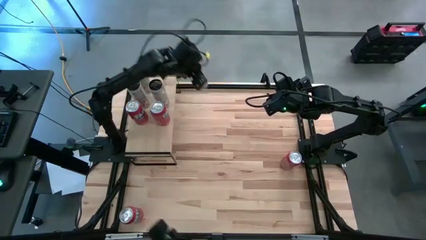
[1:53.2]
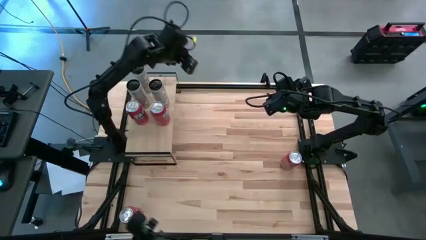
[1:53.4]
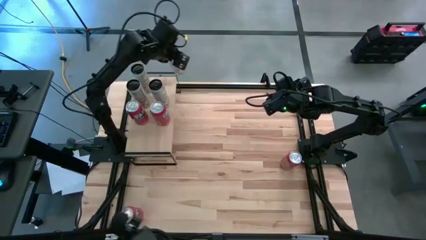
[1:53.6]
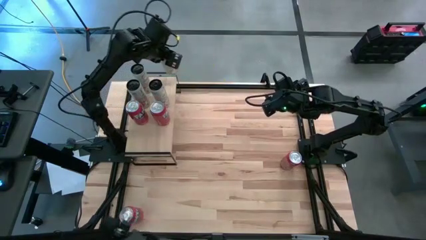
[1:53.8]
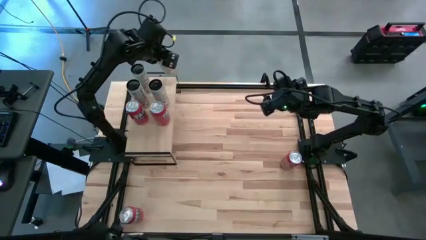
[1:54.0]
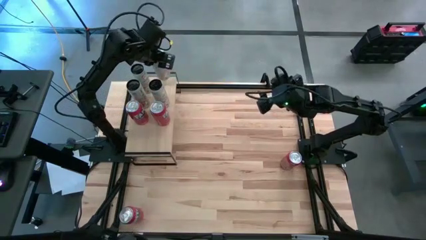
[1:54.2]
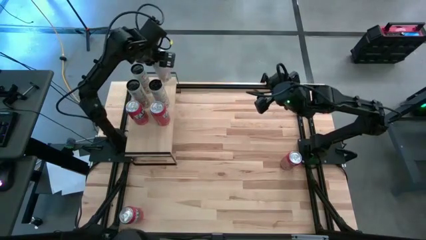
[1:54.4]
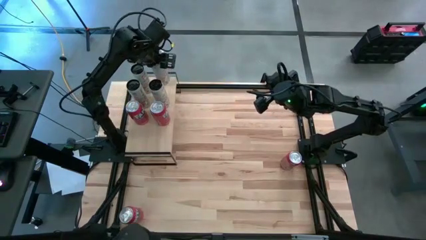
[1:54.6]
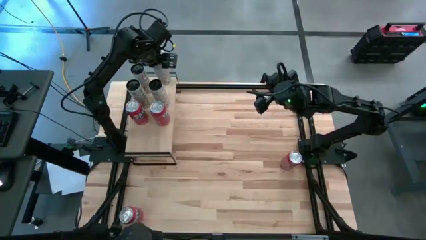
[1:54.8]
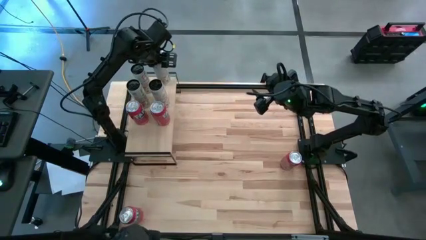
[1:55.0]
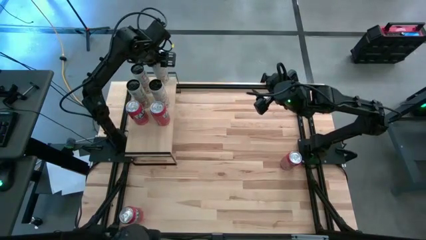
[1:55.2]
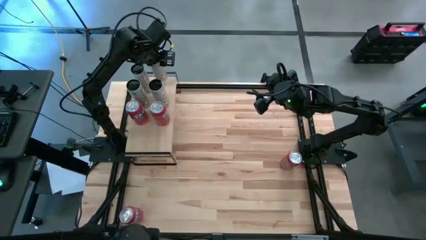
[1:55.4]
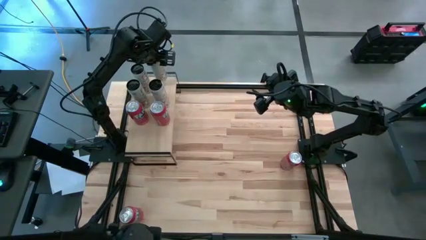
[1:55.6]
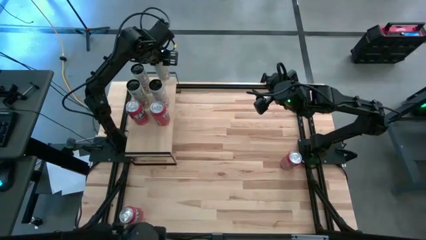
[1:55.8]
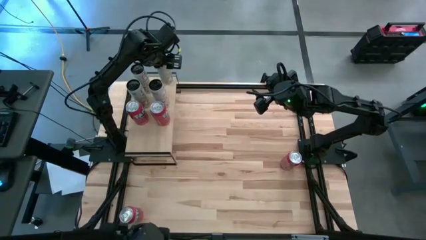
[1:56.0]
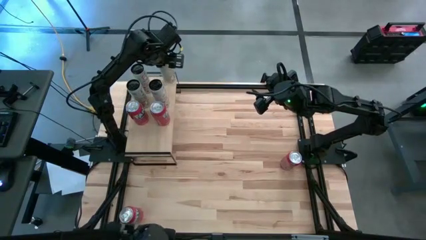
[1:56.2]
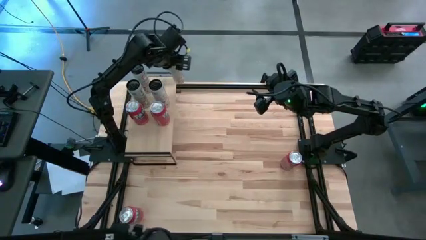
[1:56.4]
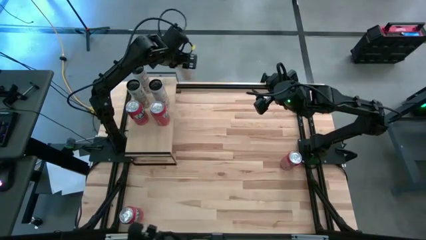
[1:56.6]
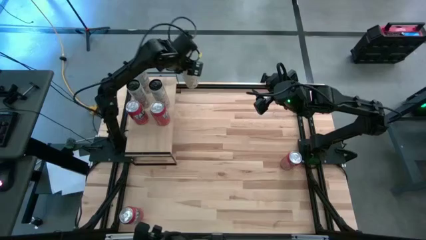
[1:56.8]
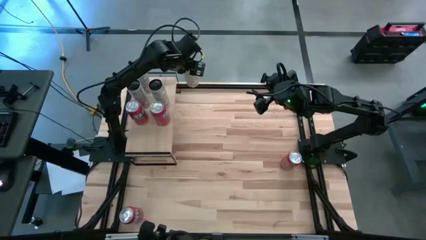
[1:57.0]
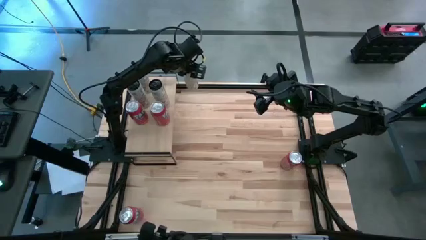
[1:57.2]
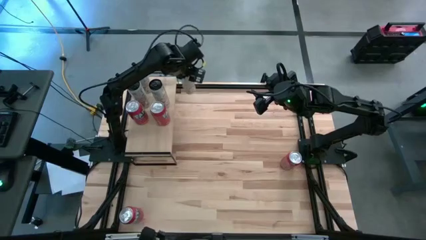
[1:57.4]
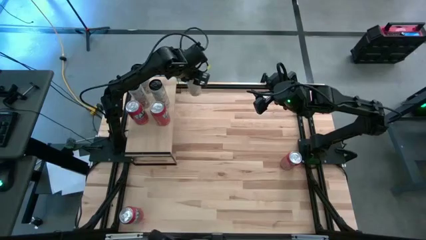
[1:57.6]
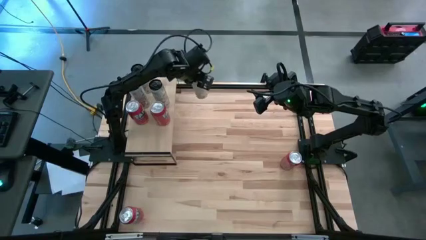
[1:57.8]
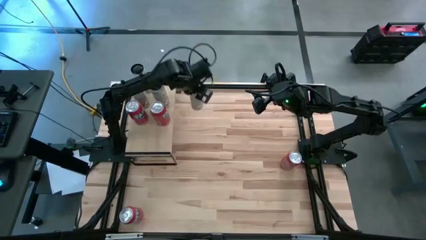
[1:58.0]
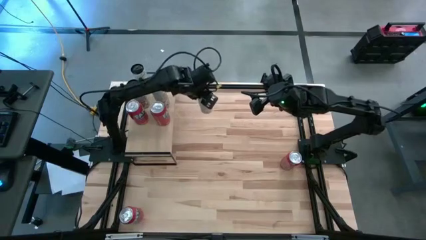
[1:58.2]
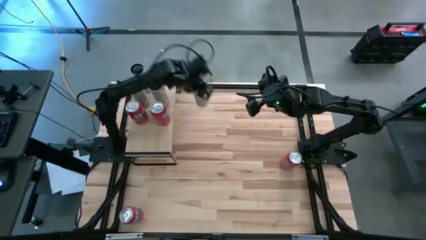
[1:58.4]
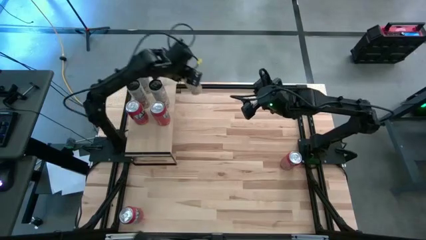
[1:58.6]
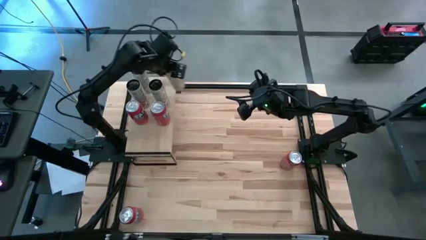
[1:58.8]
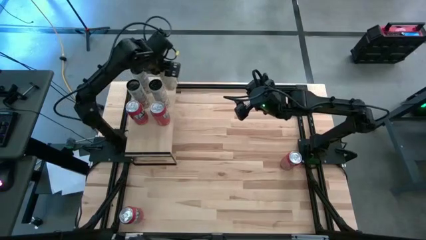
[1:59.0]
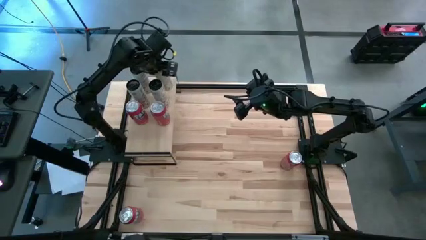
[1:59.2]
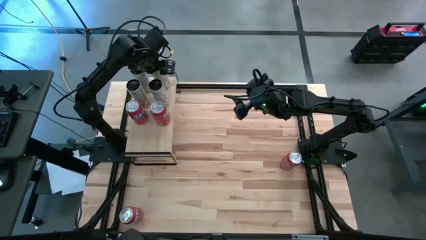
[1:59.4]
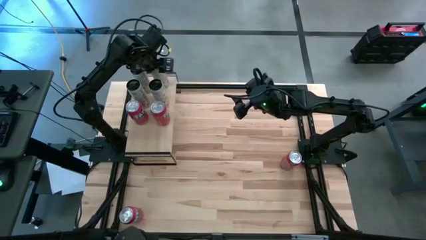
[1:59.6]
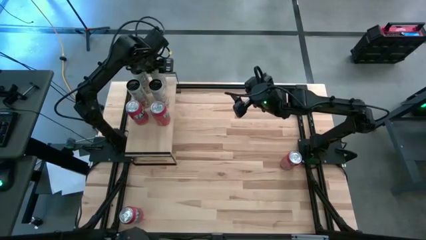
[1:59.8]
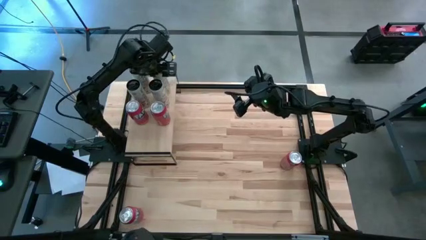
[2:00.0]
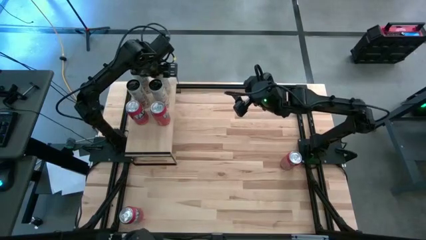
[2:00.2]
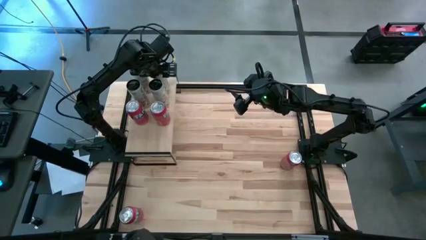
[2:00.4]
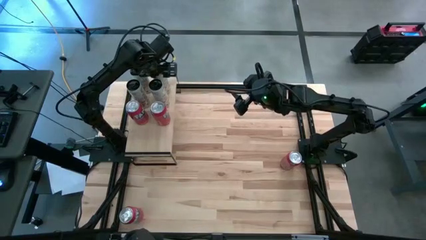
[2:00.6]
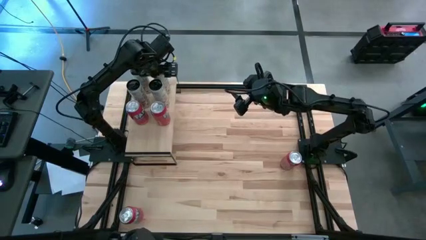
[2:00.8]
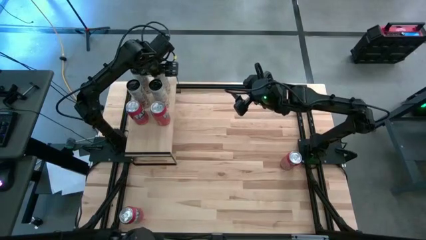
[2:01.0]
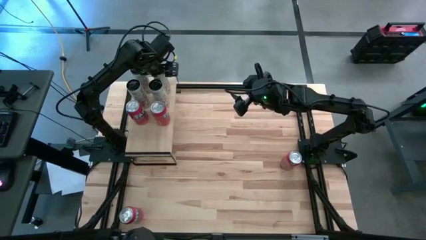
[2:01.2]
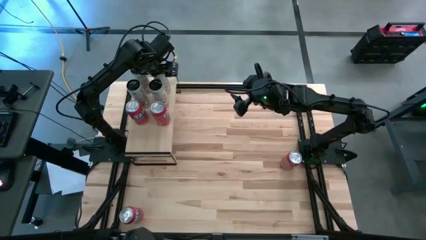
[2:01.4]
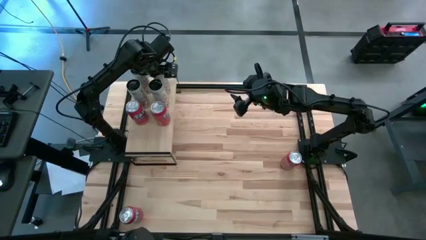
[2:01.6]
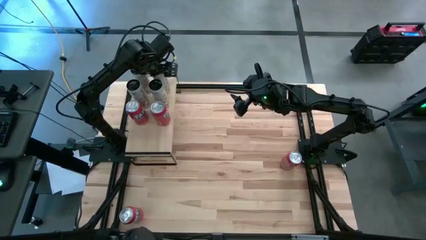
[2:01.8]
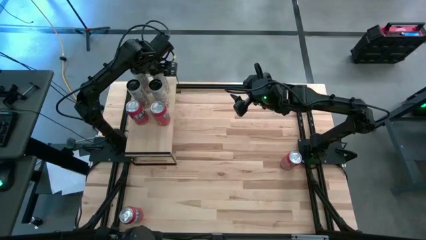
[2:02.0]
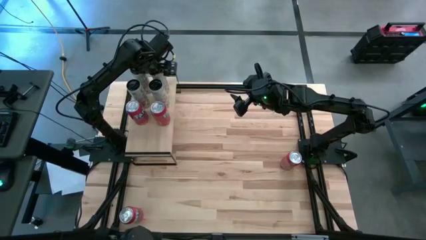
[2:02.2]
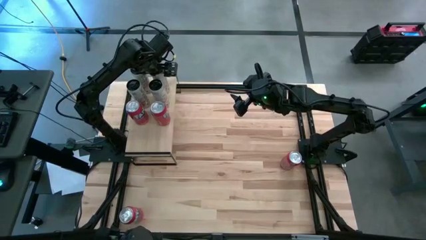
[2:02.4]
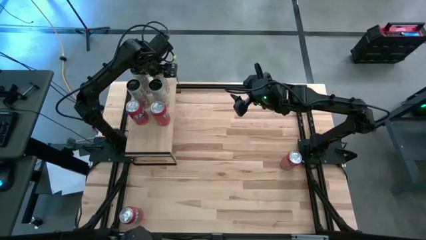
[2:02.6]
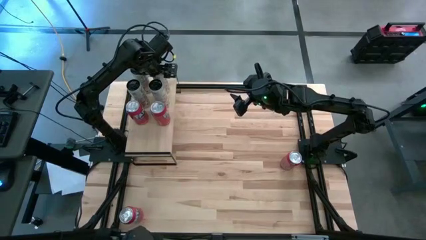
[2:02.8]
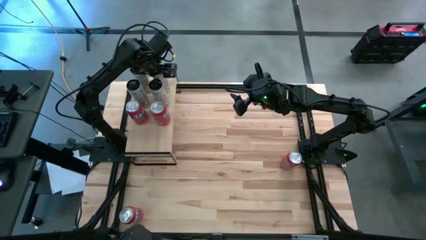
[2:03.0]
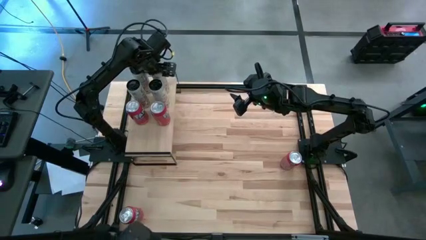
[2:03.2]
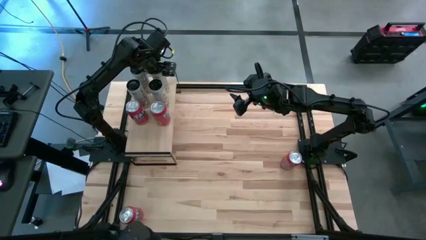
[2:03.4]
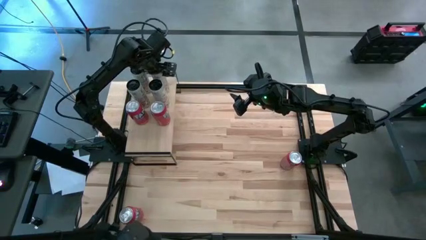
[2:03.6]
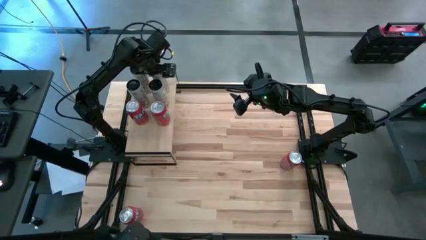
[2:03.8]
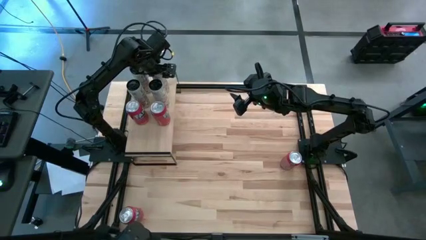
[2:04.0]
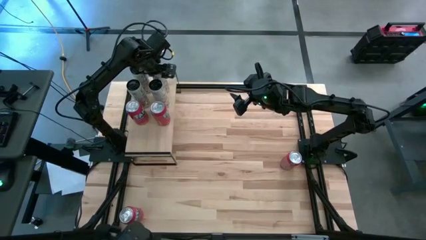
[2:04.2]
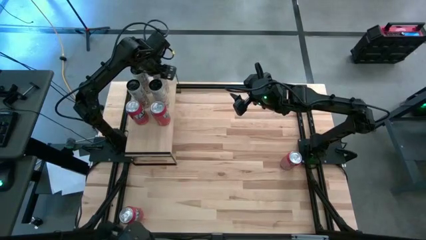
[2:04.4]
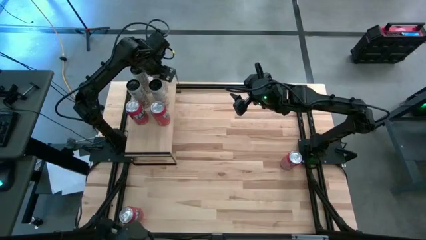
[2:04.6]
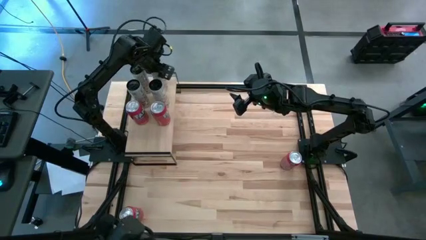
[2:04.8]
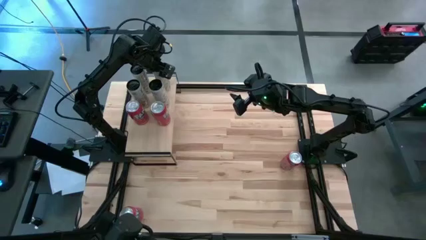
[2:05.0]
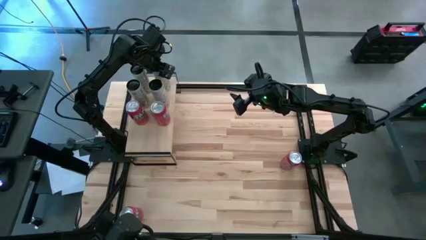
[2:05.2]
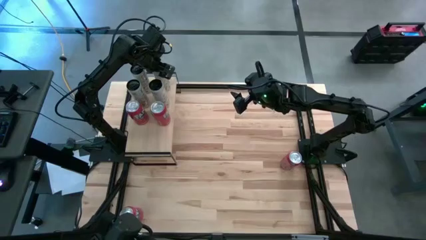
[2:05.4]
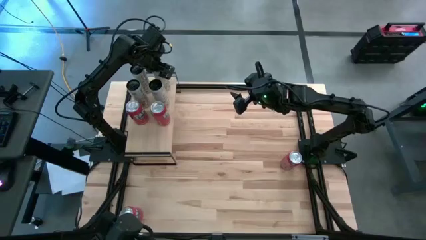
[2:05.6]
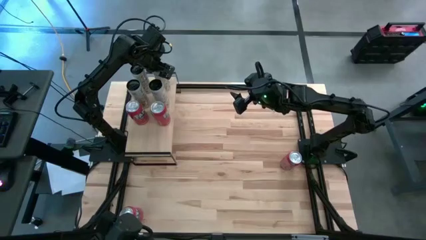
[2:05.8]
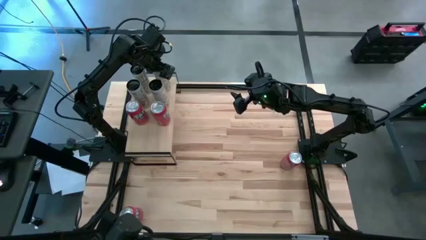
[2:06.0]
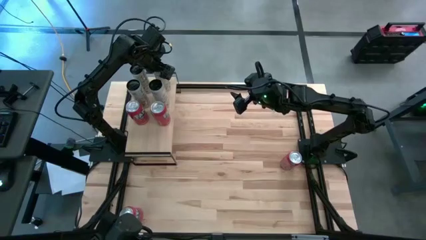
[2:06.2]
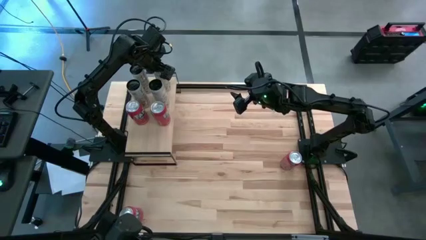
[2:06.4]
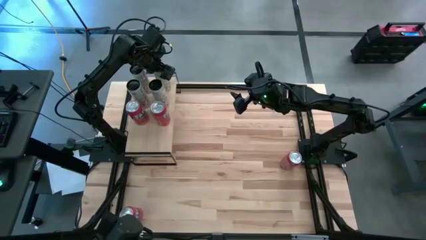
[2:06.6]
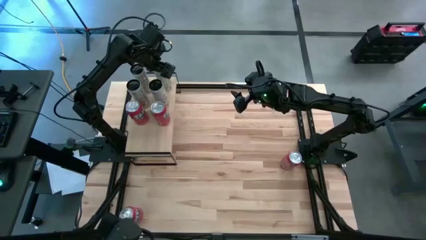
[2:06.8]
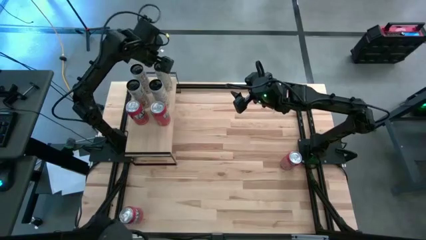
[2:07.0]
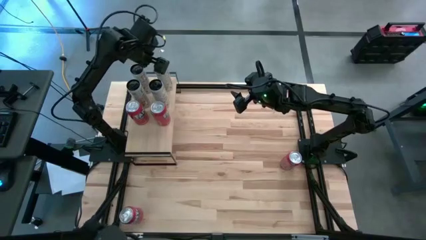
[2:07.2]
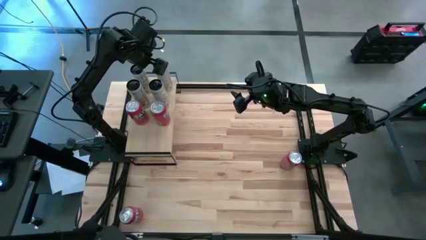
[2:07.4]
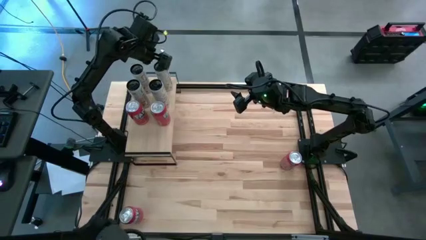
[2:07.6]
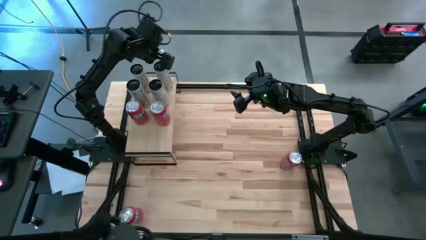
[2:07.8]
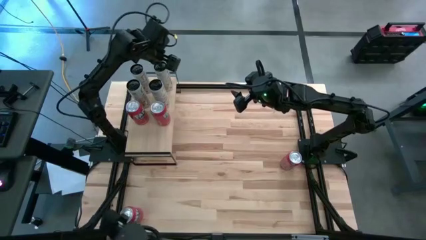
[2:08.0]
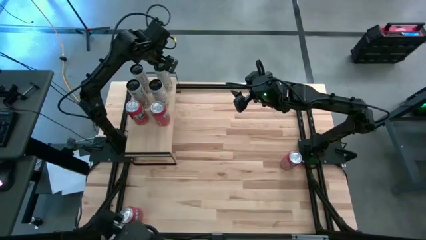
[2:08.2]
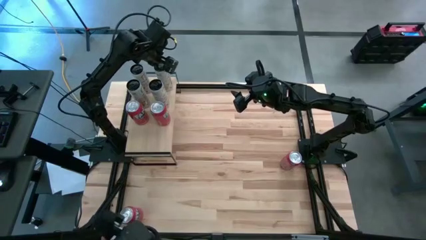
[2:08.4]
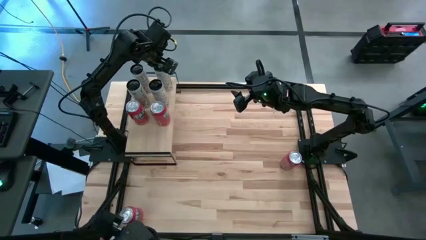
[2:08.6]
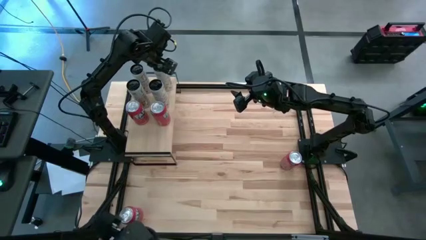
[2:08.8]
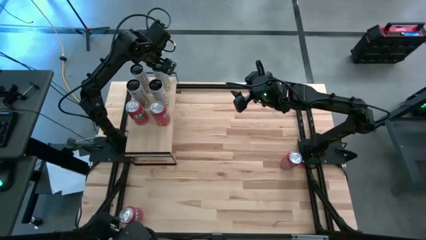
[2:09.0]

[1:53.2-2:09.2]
Task: Place canned beverage on shelf
Put the white yellow soda can on the shelf aligned with the other white yellow soda can
